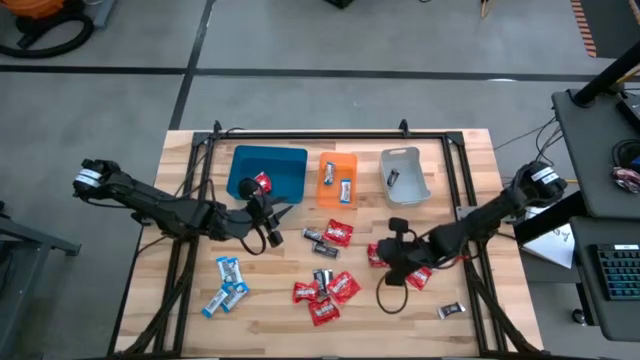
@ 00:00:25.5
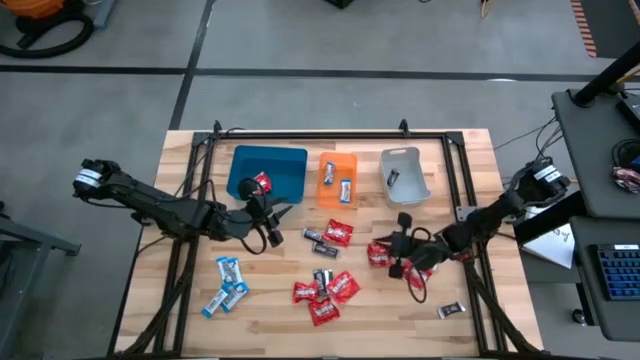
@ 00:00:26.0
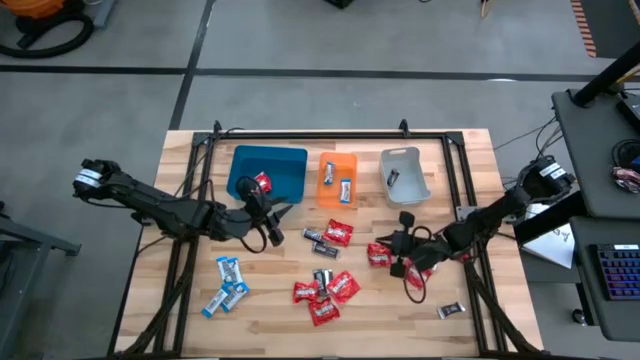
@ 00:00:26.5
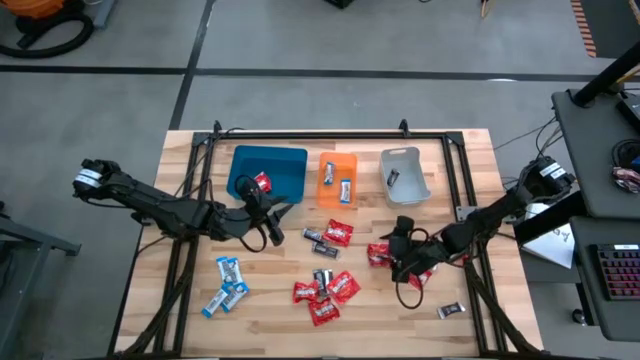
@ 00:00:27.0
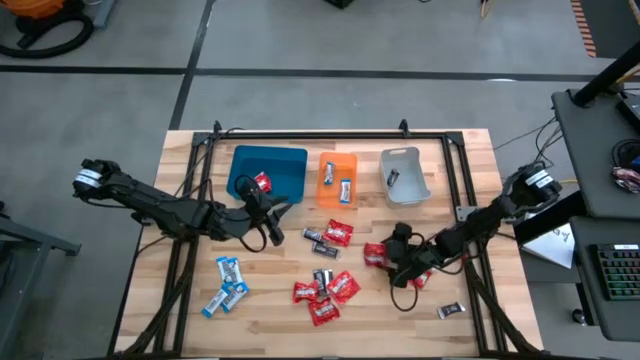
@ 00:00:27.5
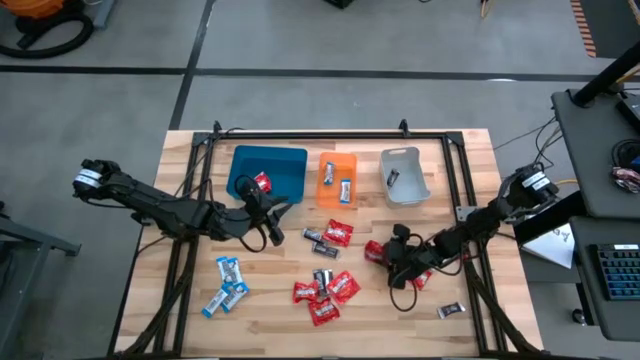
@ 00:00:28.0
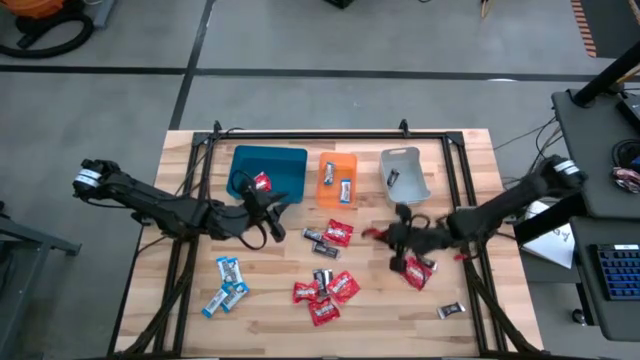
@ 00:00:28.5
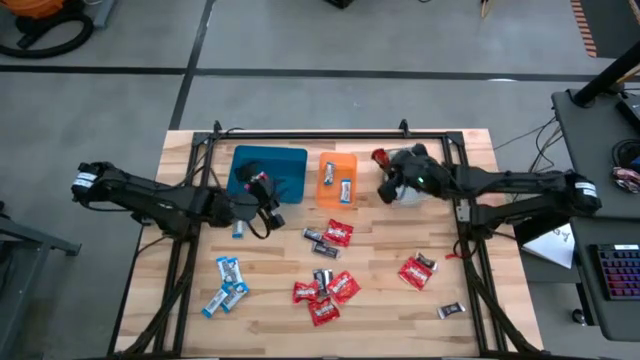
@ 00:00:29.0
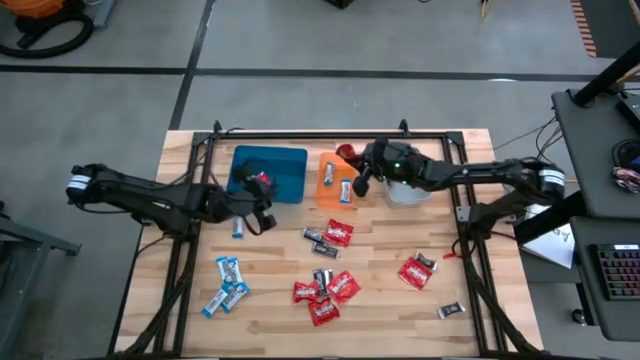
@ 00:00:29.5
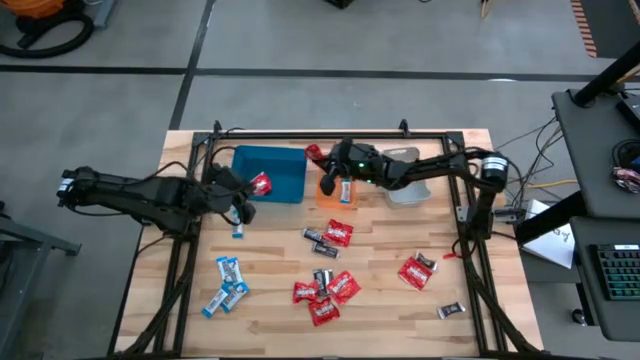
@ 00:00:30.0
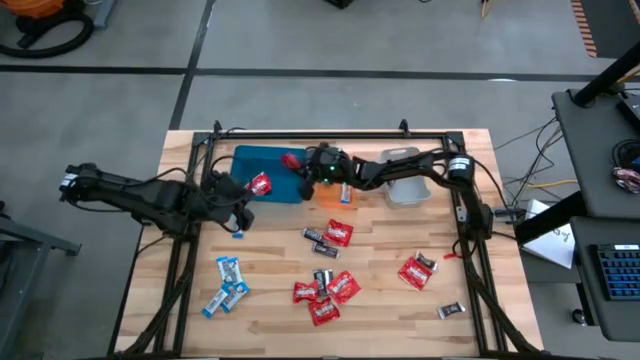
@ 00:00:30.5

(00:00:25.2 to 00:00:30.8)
Task: Sort candy
Put the red candy into the blue bin

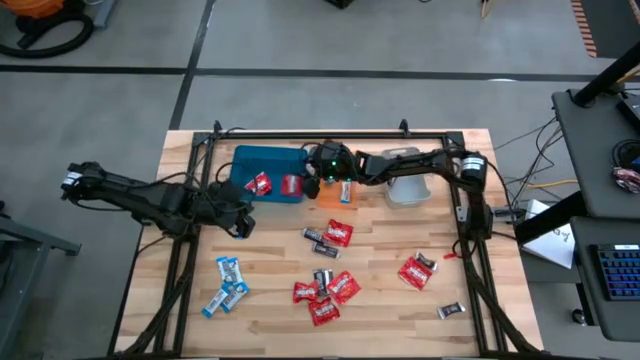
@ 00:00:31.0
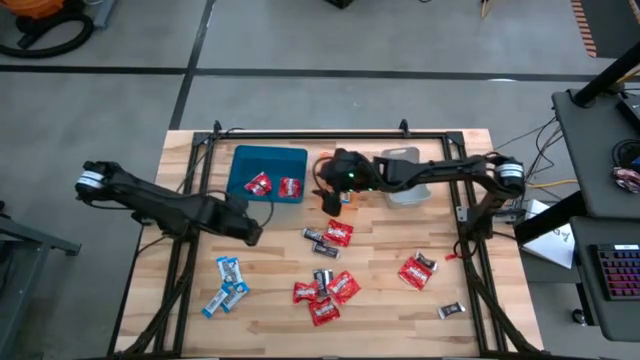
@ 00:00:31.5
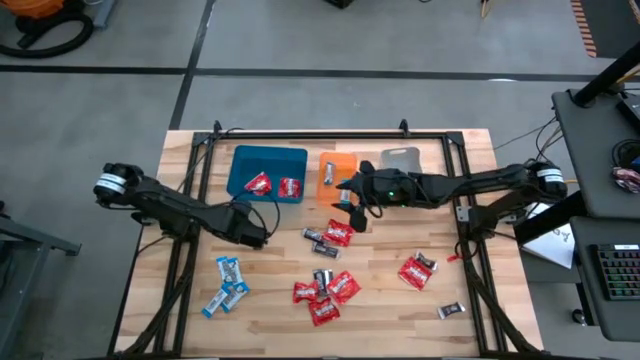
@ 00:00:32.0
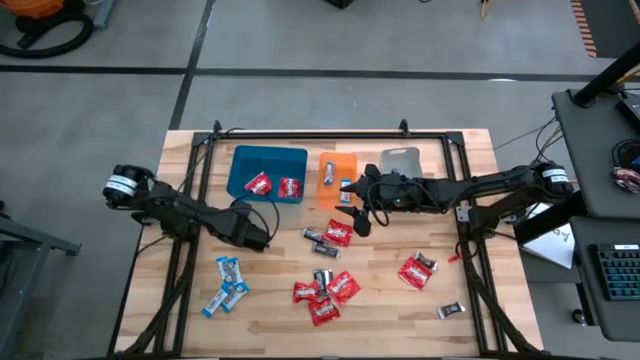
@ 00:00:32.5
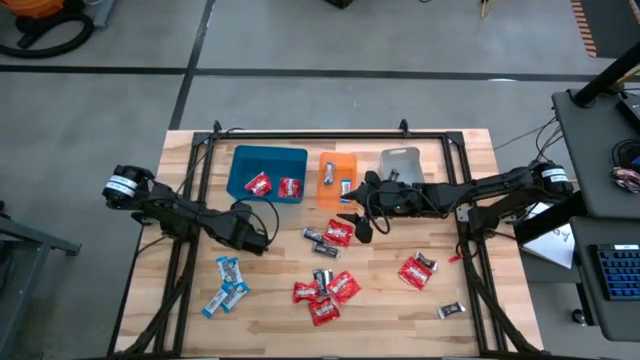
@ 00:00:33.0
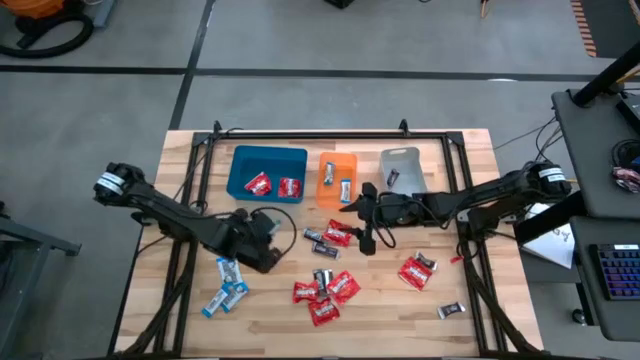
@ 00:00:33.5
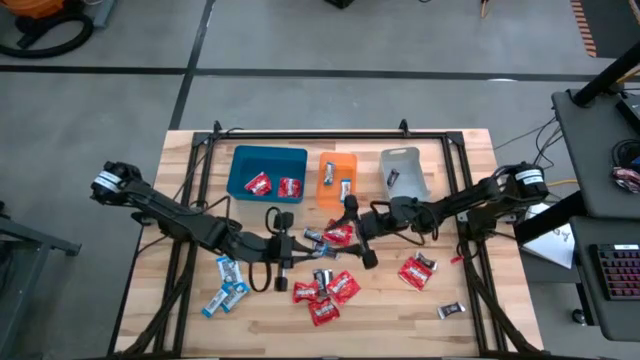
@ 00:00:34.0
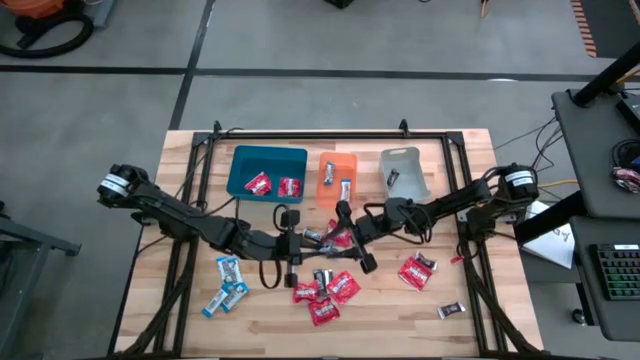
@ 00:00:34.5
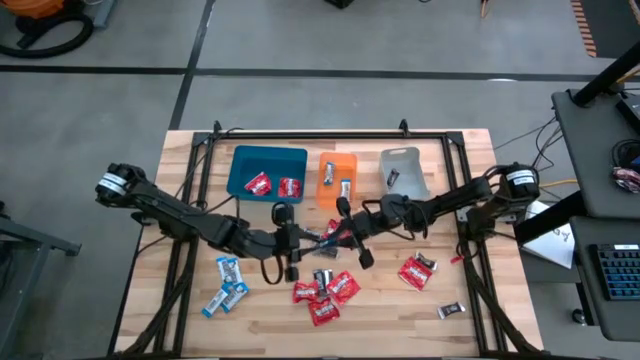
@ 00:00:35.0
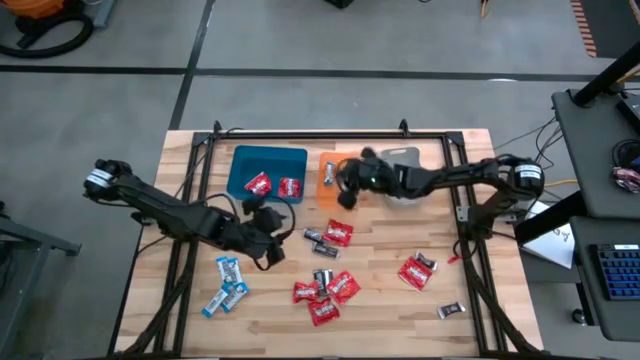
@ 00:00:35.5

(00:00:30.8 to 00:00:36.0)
Put the white chocolate bar into the orange bin

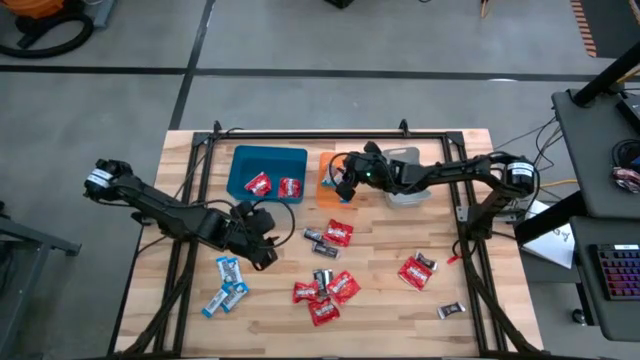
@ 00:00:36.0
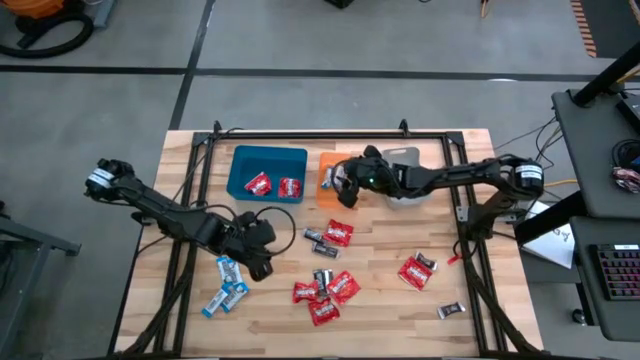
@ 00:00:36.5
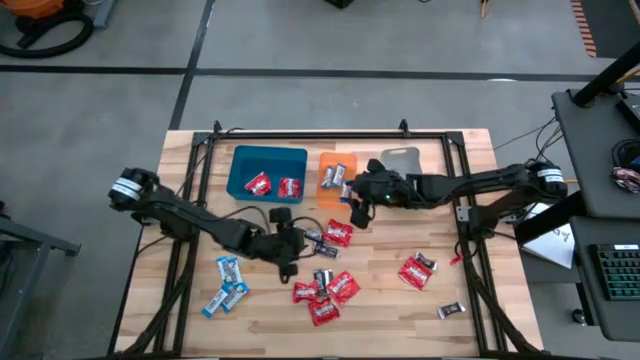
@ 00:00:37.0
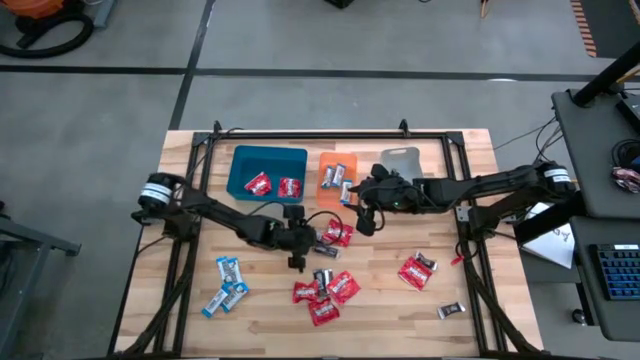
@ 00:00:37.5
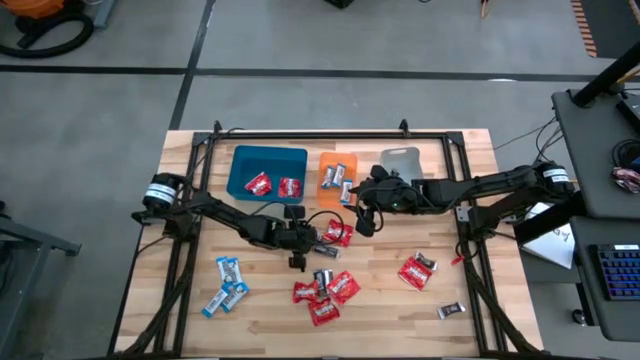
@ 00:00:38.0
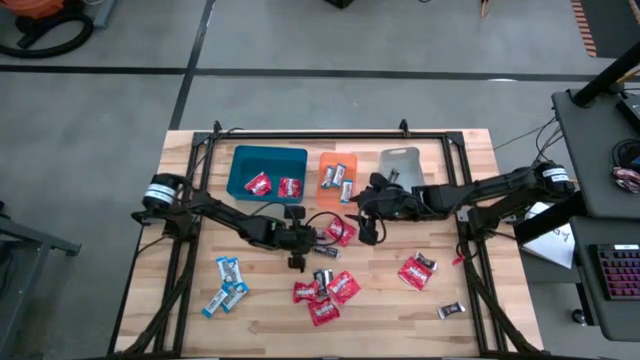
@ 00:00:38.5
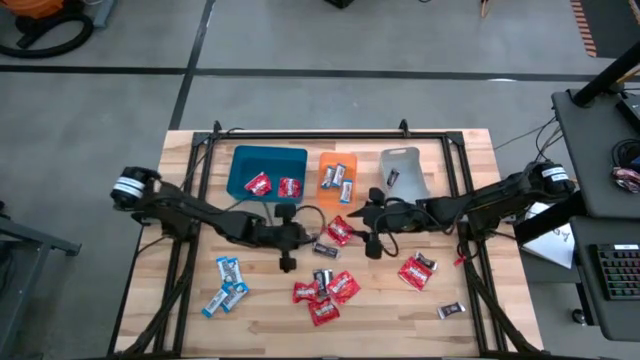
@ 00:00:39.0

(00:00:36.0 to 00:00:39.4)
Put the brown chocolate bar into the gray bin

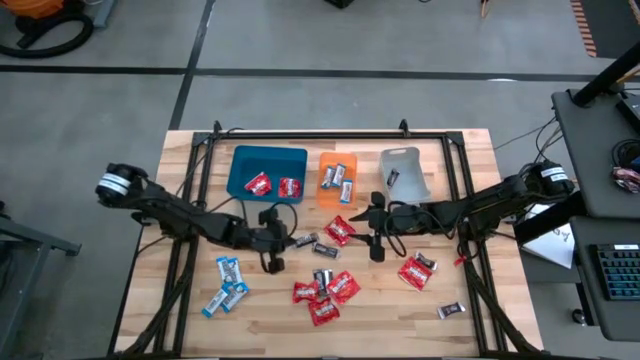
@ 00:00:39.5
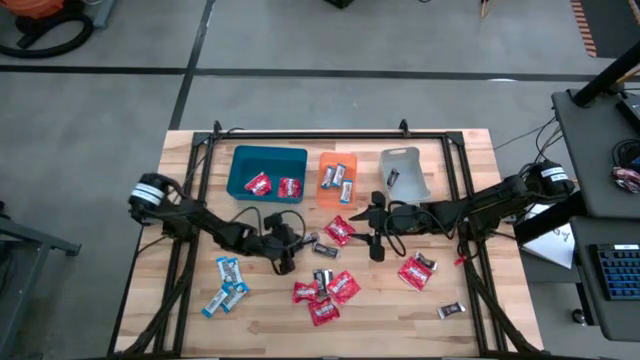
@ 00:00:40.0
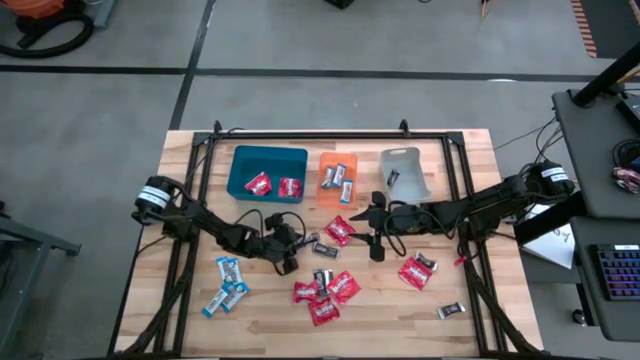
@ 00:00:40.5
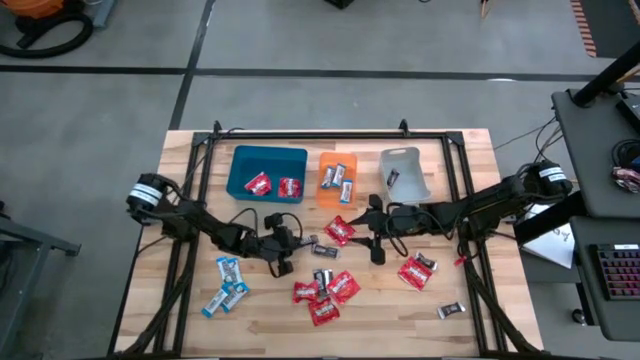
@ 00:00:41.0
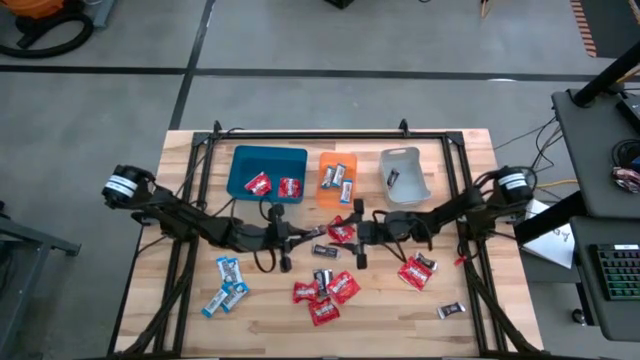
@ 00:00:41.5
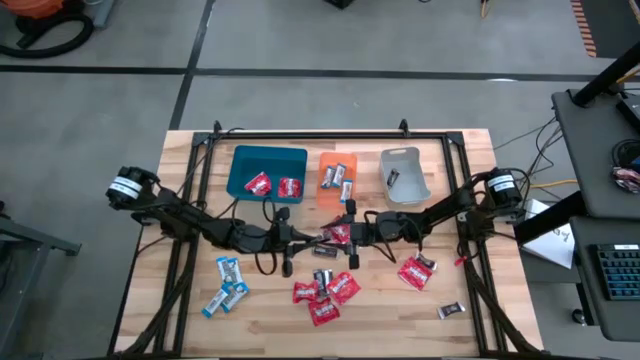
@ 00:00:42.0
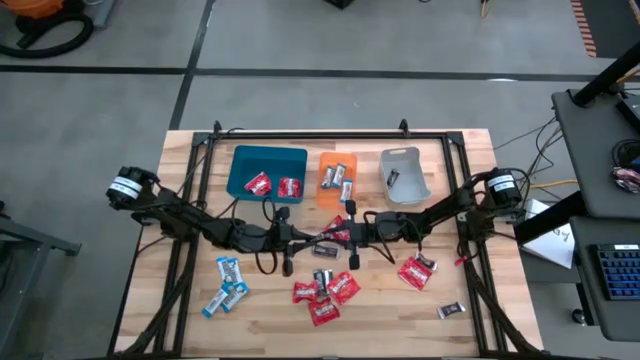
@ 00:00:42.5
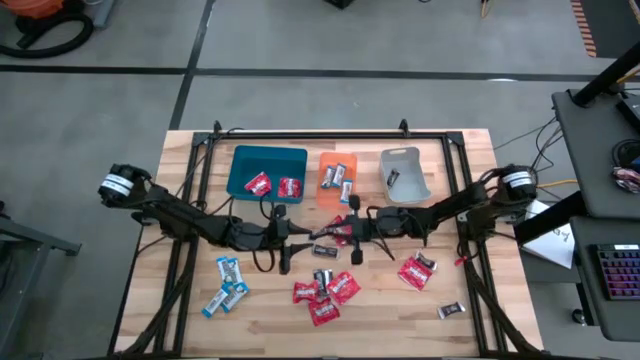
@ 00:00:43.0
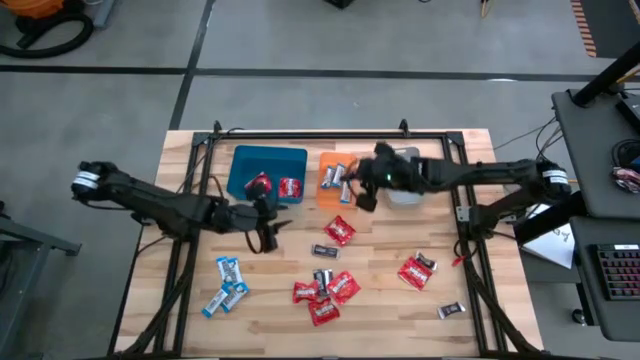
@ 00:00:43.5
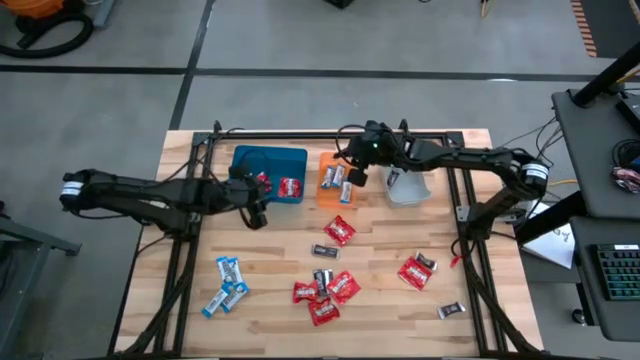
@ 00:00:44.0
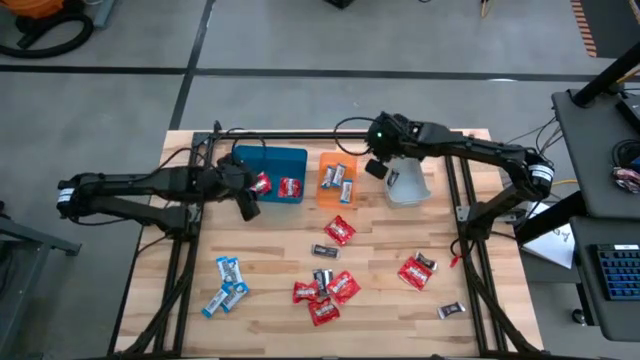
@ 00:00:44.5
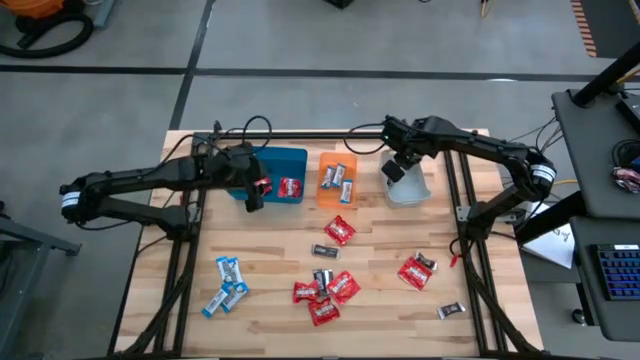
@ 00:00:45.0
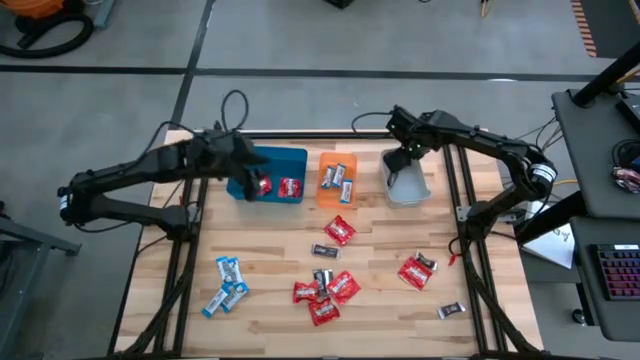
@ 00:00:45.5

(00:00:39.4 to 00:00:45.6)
Put the brown chocolate bar into the gray bin
